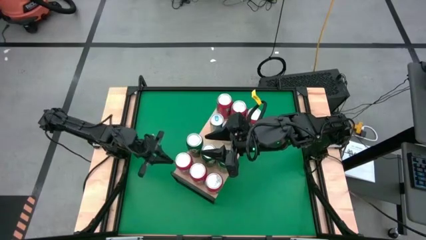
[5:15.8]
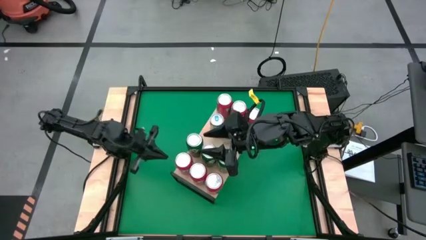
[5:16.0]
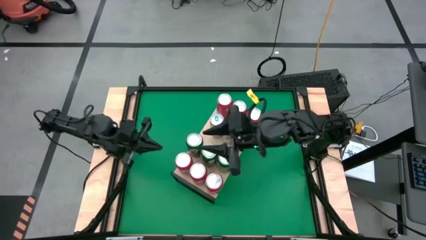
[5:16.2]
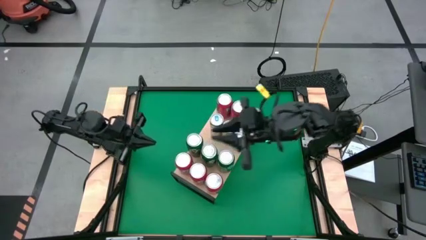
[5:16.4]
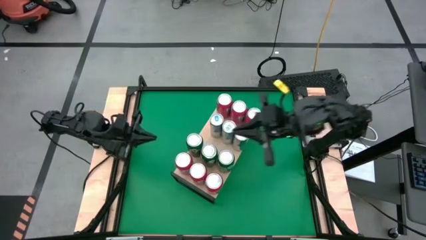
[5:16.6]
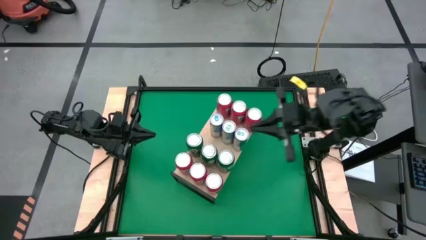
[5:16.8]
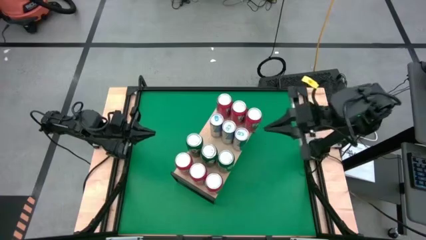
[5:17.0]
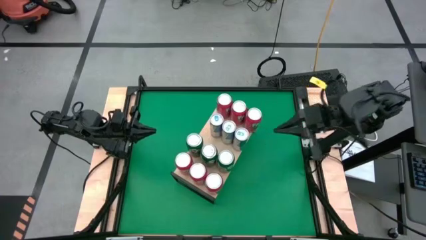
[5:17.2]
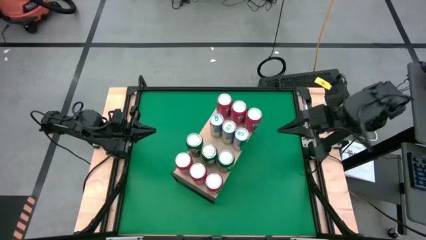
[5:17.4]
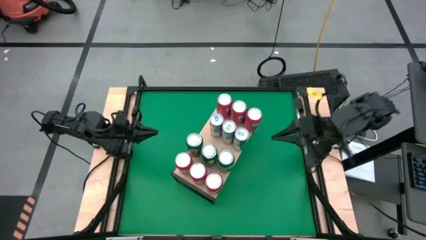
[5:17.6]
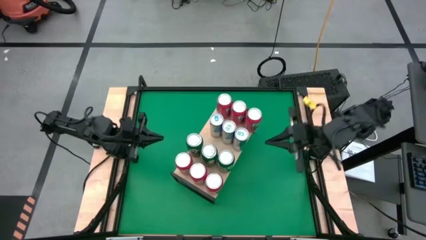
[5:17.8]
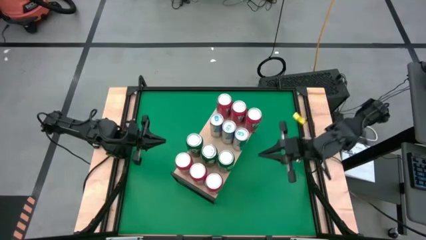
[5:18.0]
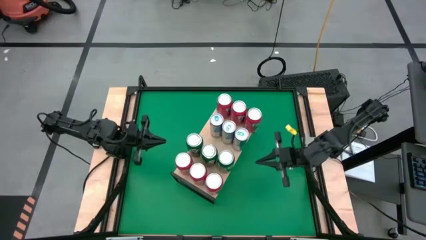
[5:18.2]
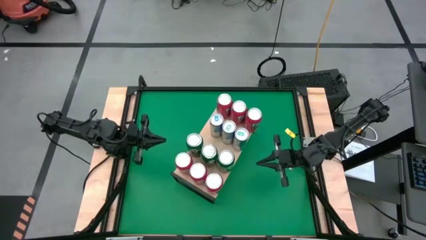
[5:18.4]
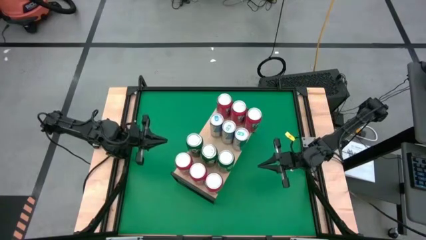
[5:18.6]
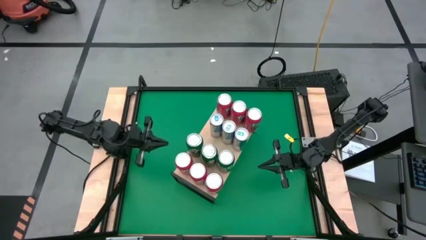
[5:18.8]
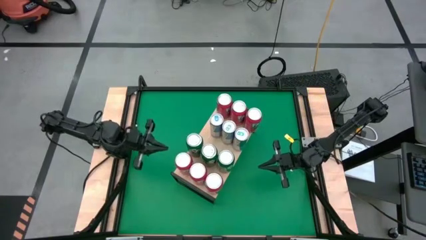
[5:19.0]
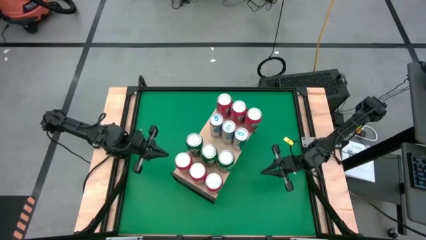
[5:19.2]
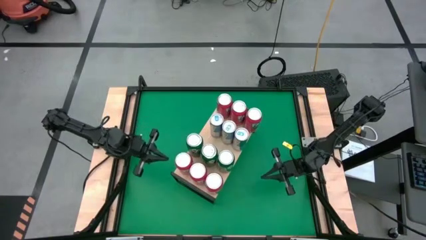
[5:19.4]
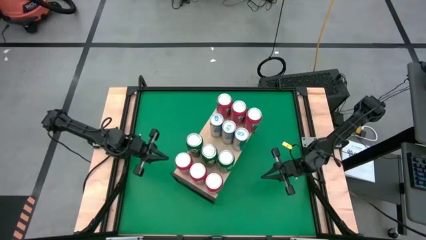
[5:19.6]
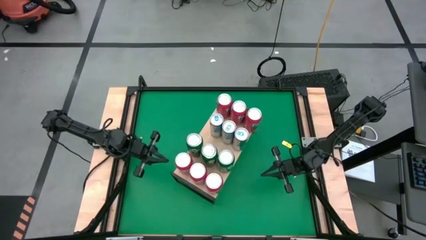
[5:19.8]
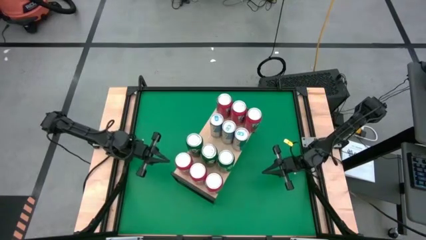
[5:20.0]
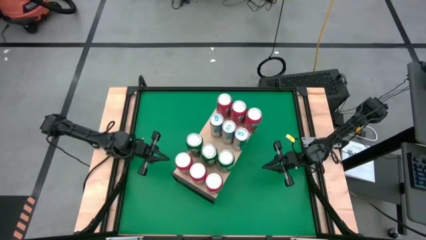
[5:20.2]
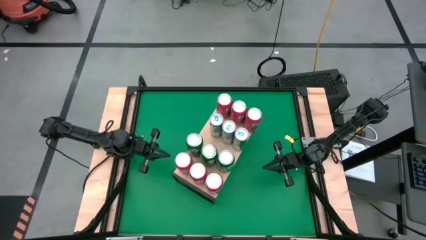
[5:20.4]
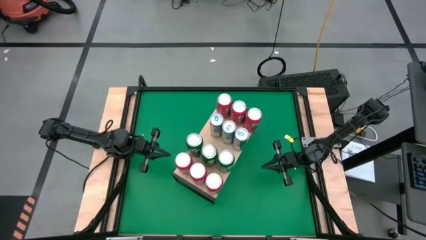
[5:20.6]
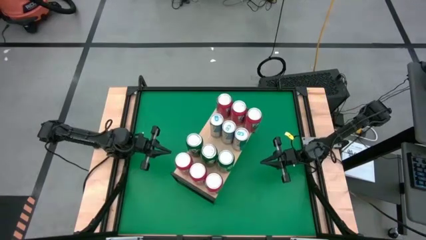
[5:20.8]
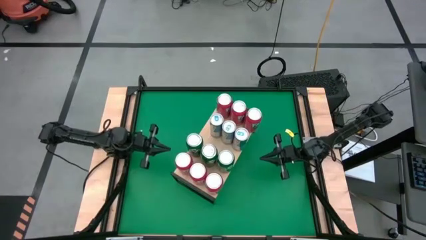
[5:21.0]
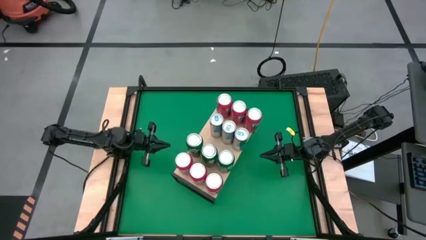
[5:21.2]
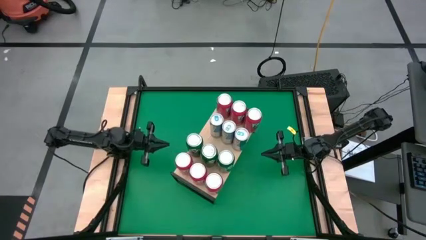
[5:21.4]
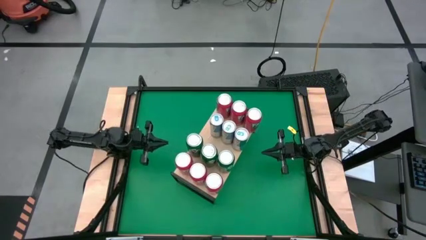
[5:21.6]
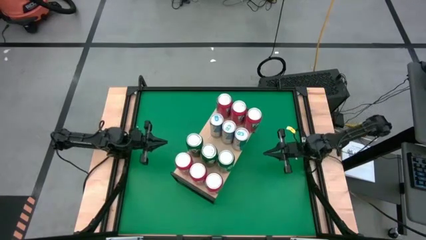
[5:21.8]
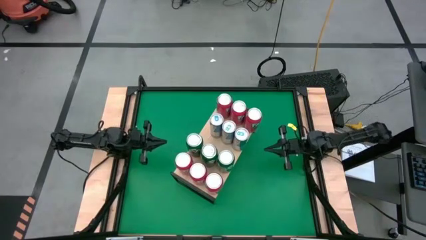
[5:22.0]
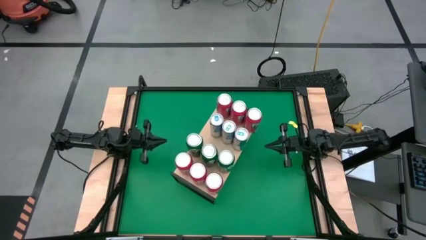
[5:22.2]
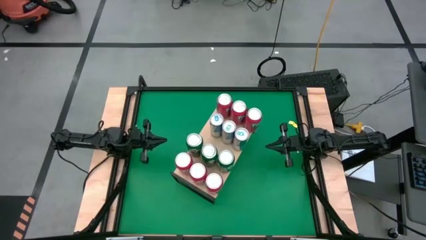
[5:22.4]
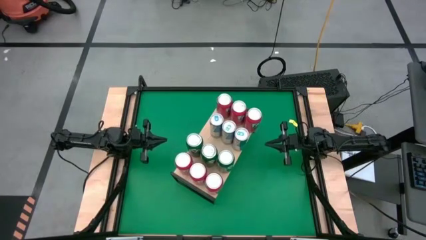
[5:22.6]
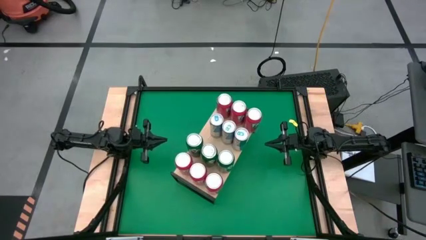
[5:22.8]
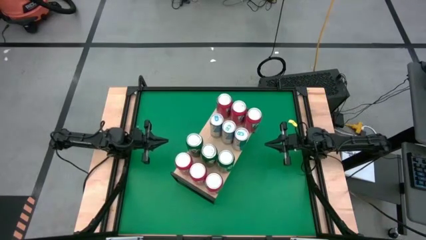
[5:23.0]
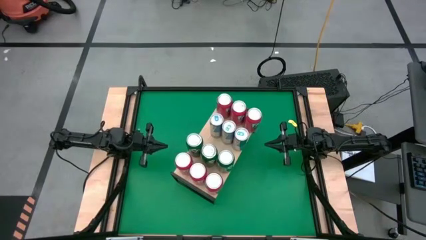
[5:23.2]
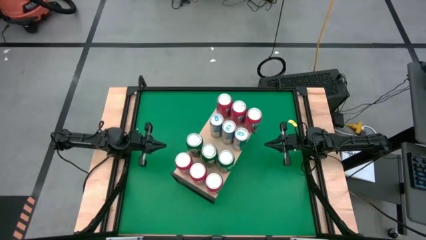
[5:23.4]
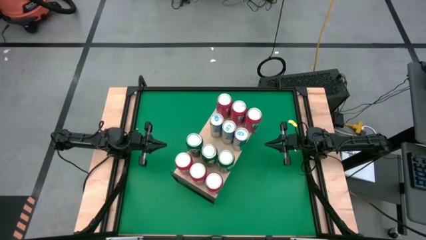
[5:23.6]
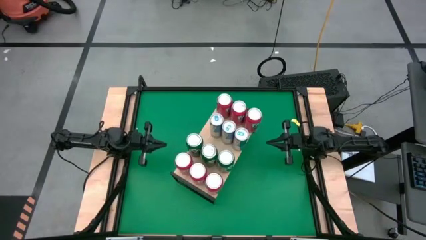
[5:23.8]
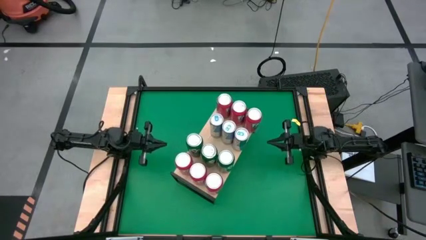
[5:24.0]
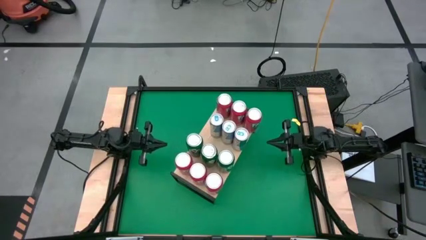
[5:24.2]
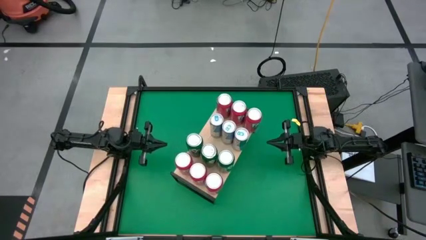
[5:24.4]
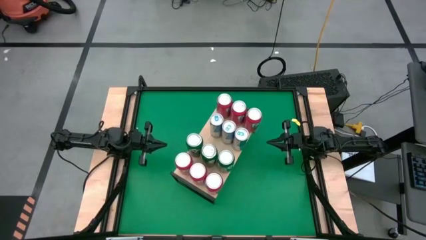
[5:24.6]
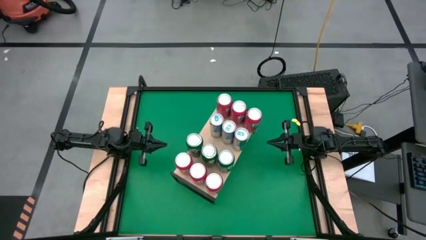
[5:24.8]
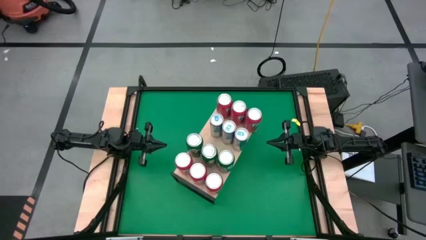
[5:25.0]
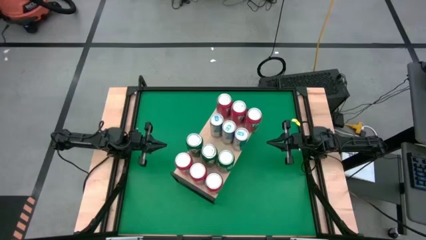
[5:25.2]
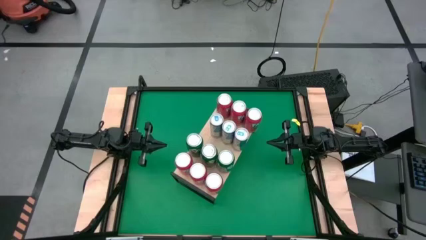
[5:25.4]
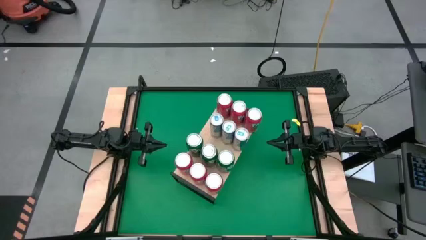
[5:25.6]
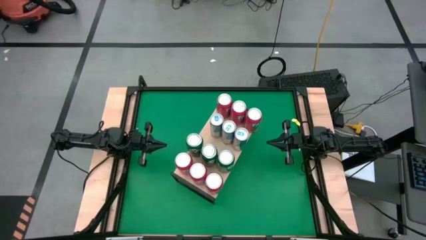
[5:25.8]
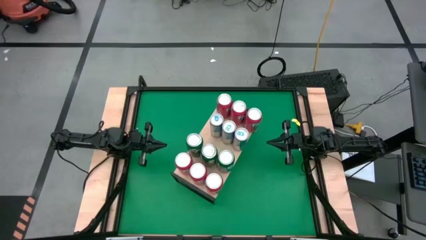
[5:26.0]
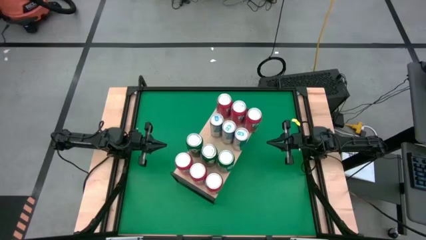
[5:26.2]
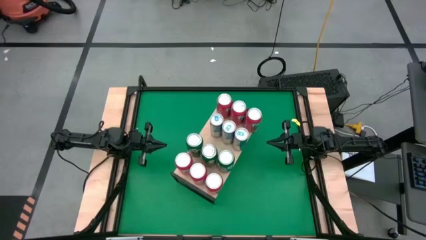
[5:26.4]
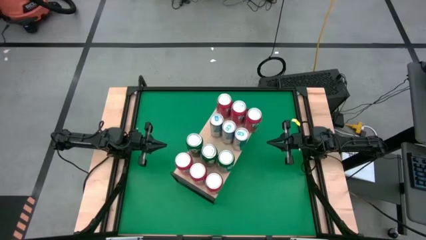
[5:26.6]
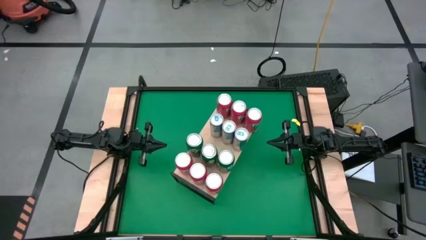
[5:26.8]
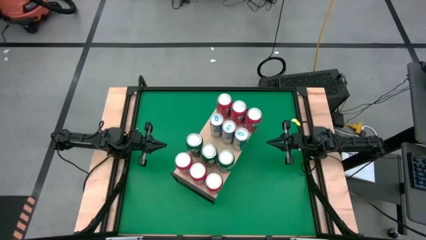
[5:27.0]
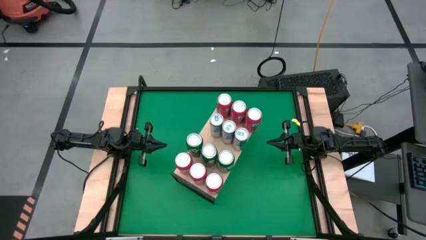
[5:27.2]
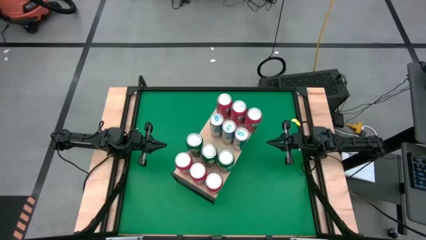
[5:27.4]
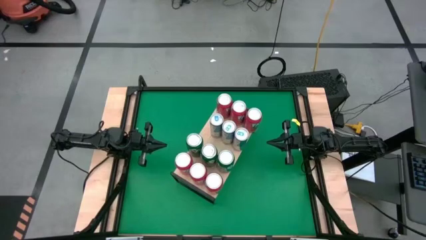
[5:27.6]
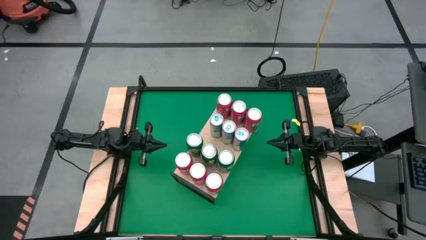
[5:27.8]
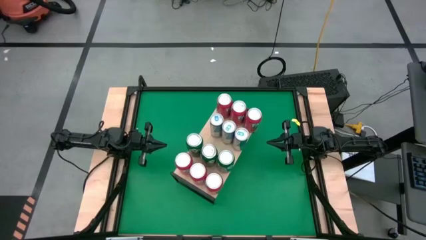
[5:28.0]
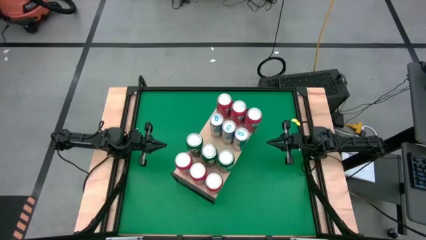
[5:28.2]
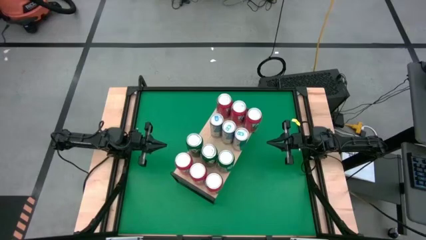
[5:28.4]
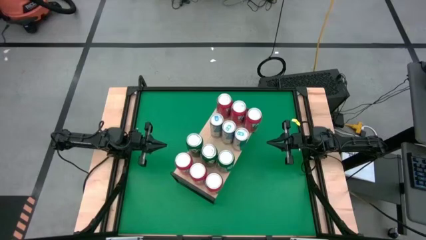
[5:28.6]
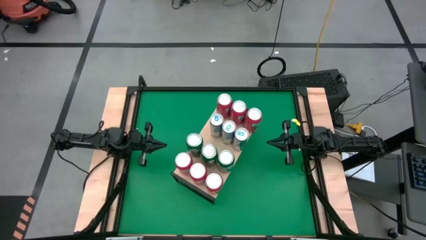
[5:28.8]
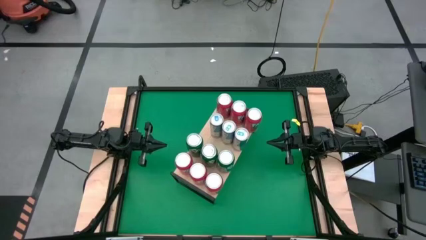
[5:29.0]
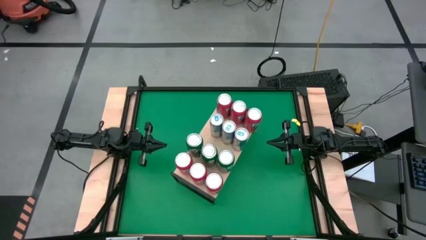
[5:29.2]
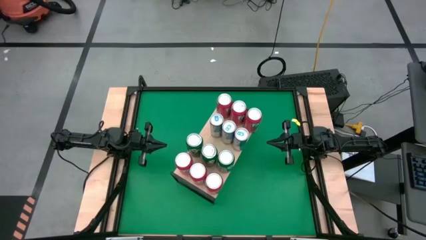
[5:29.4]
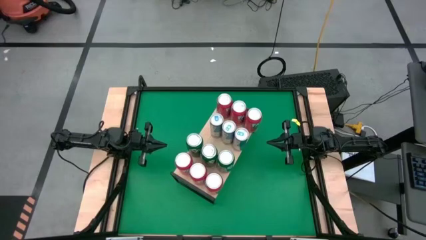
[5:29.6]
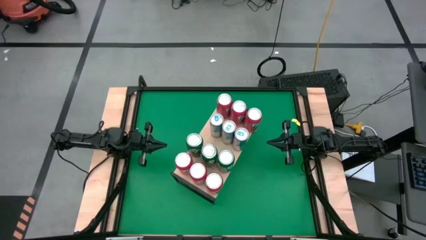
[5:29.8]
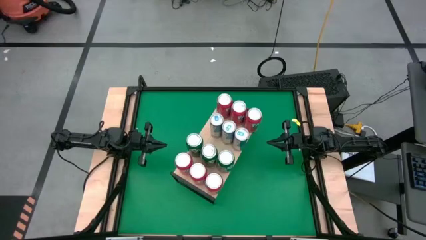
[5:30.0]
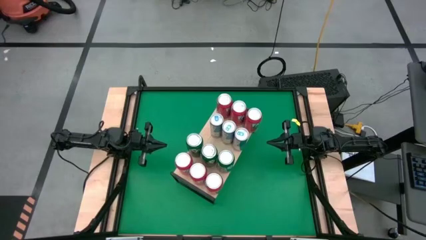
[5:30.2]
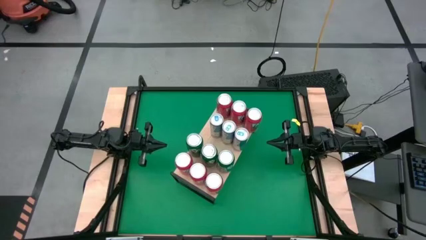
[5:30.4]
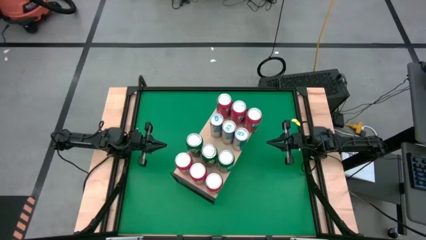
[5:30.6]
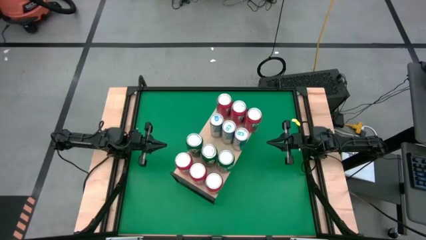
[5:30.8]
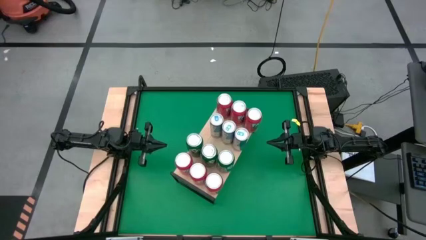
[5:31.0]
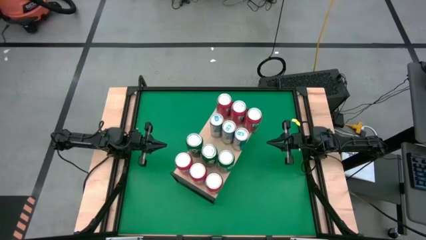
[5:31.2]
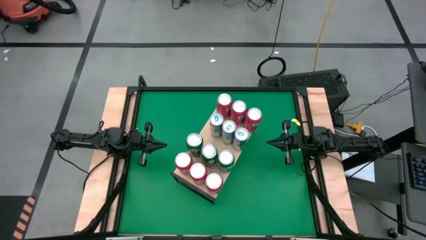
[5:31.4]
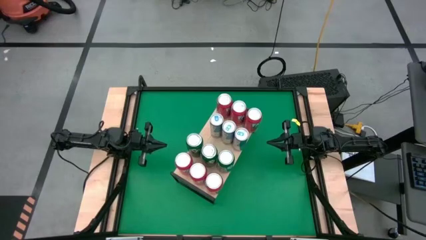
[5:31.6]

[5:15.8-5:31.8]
Task: Sort soda cans
Return to Home Position

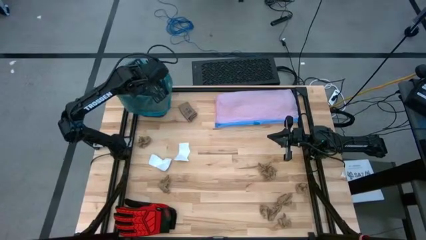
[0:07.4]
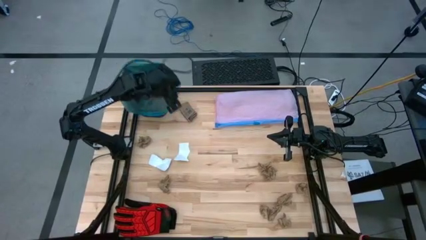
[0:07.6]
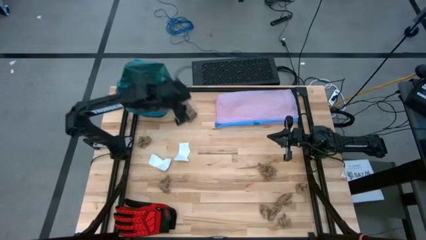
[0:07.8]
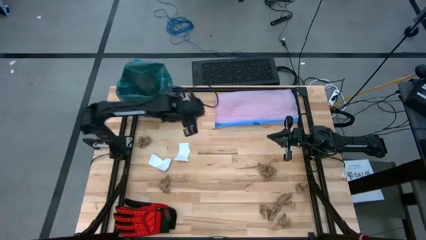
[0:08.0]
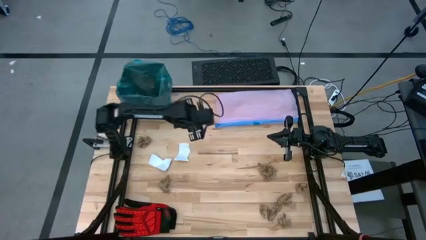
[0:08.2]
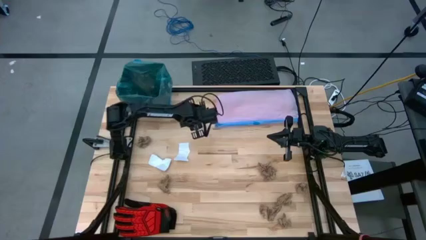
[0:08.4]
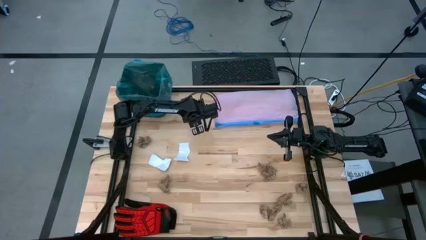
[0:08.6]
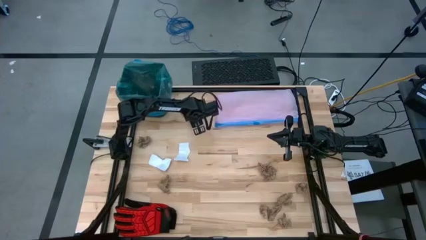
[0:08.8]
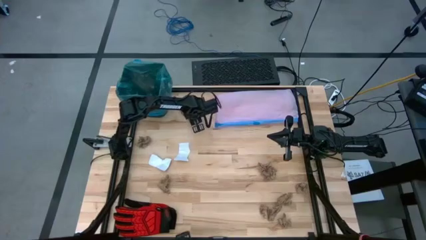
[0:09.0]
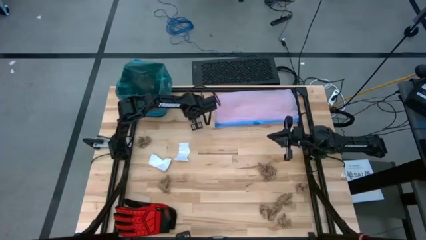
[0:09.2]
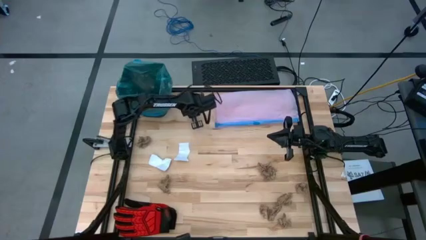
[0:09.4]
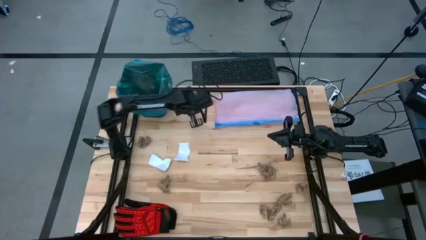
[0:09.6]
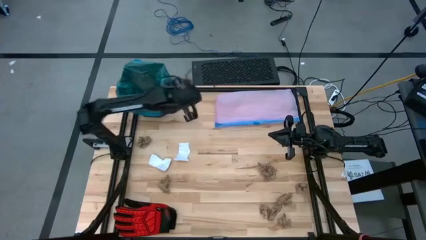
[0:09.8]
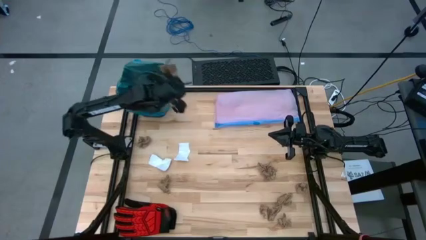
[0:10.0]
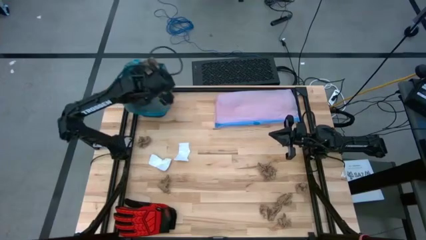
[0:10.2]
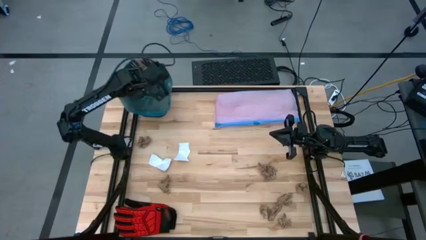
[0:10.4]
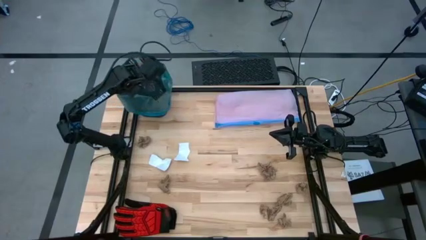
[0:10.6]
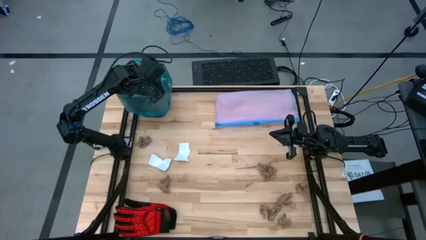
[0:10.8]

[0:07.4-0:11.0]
Task: place trash/remove bag and relplace
Put the brown paper into the trash bin
